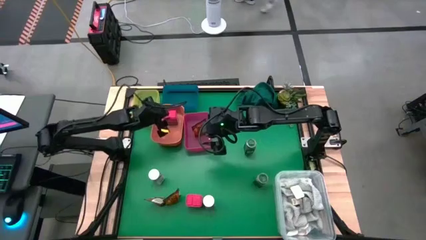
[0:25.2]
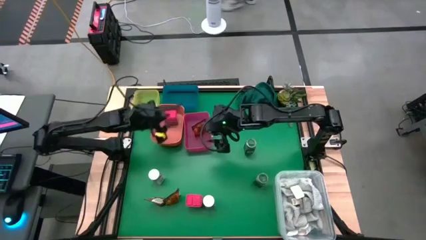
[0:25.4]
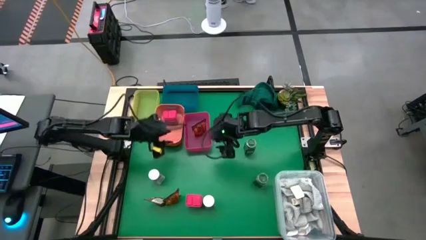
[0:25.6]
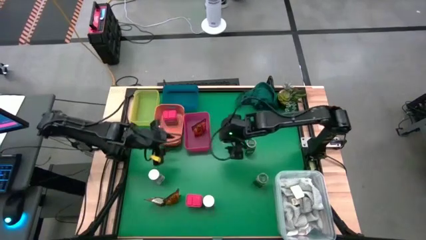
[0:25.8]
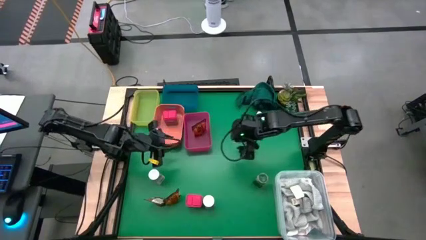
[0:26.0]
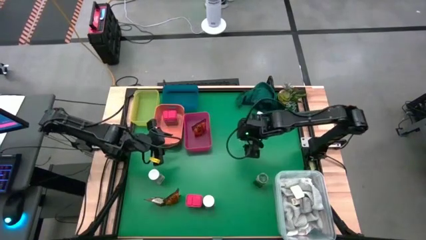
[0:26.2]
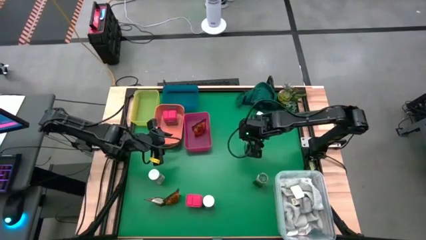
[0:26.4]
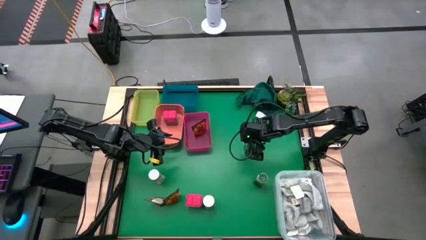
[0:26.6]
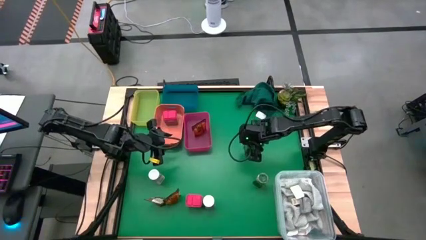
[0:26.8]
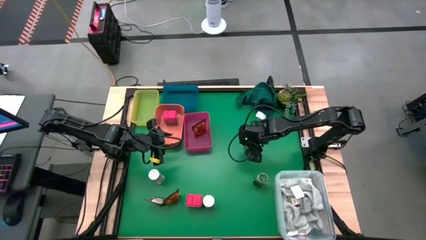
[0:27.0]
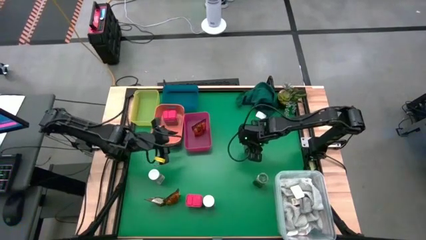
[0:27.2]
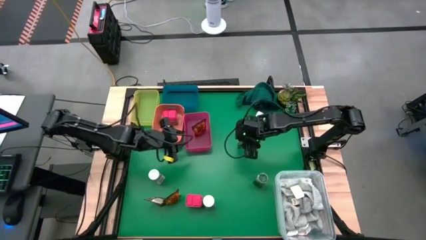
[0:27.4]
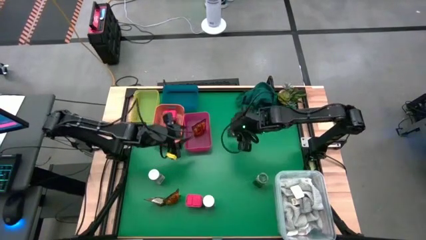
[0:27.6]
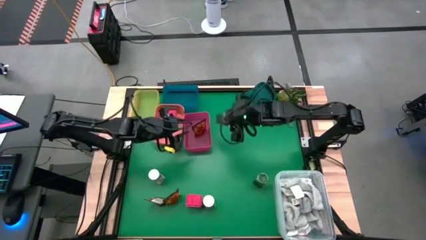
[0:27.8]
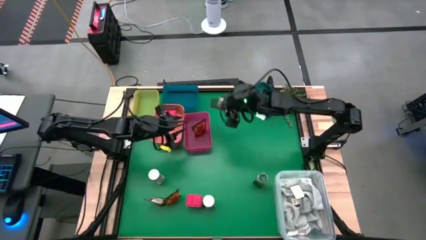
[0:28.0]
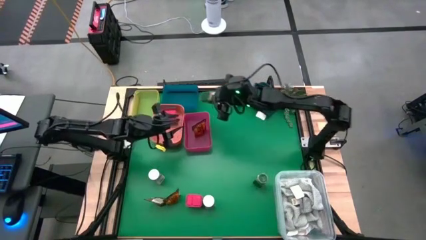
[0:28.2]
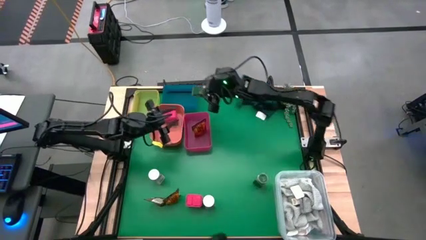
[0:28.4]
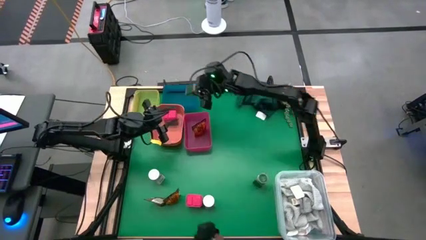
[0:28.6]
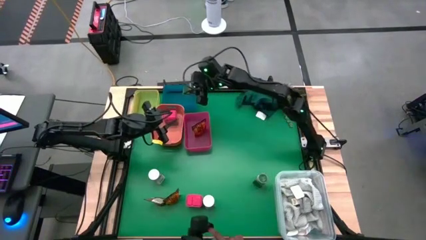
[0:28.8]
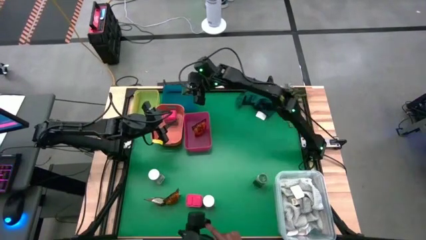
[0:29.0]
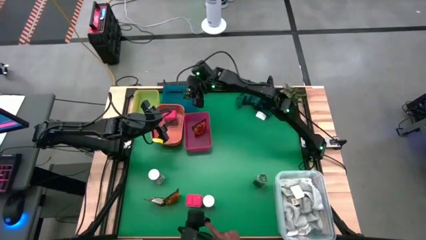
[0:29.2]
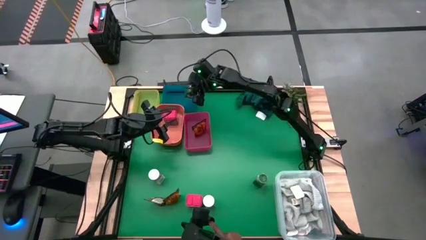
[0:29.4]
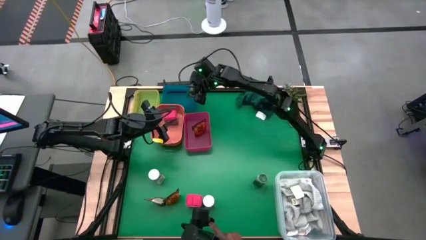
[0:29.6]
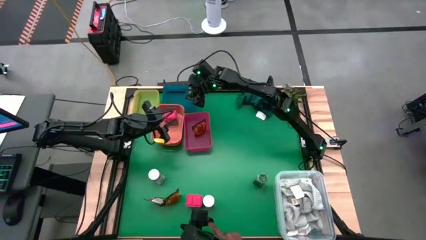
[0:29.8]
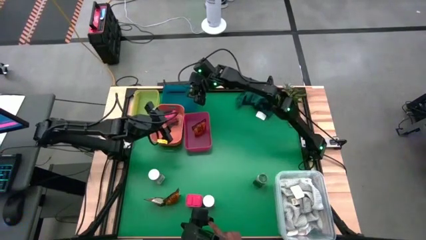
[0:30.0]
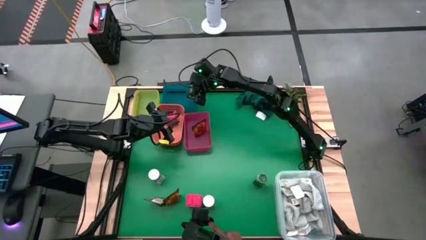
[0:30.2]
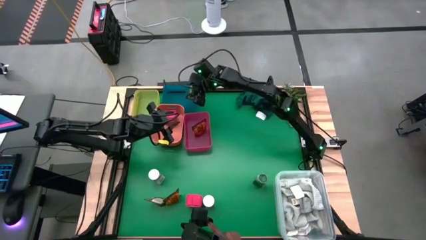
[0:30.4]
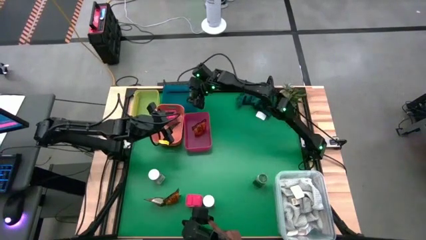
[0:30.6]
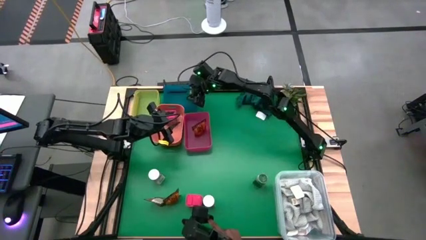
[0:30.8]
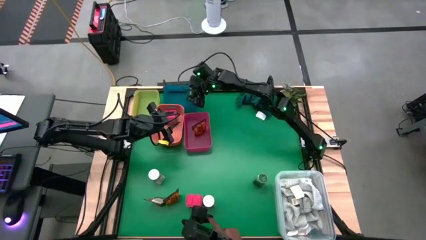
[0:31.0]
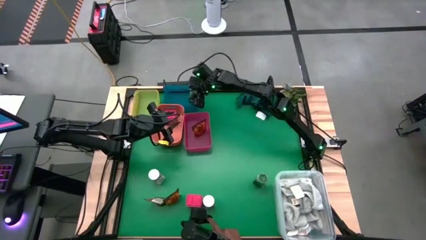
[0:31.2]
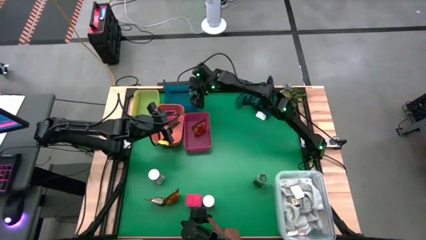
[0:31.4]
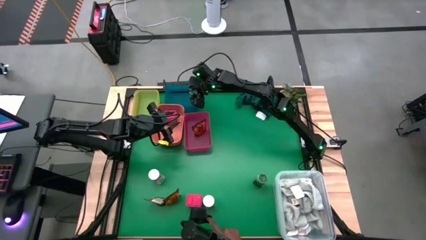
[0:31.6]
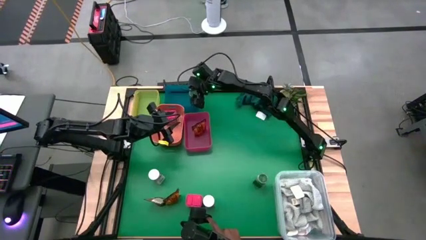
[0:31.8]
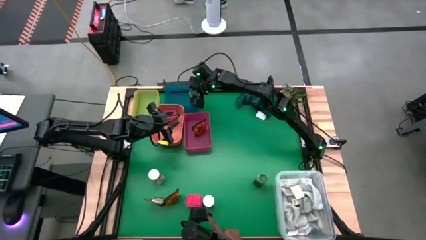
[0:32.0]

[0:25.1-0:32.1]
Task: Sort spices by type
Put the top green seasoning bottle into the blue bin

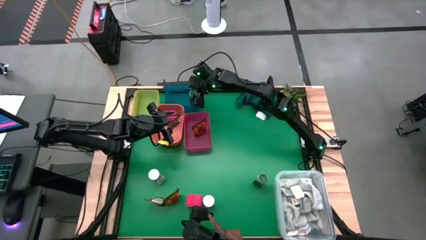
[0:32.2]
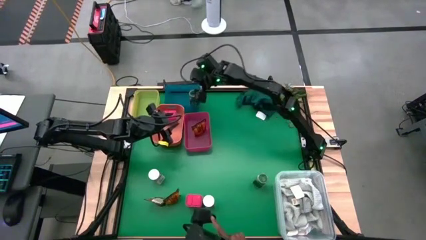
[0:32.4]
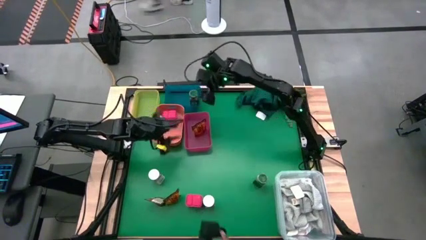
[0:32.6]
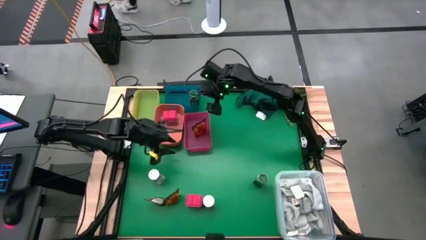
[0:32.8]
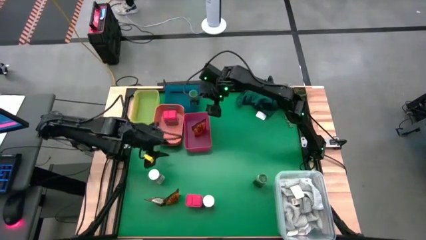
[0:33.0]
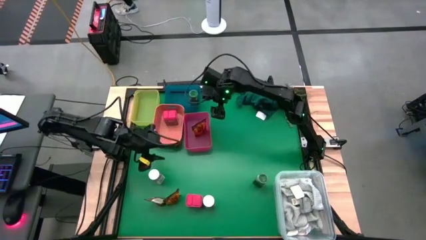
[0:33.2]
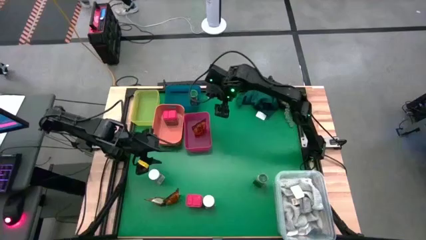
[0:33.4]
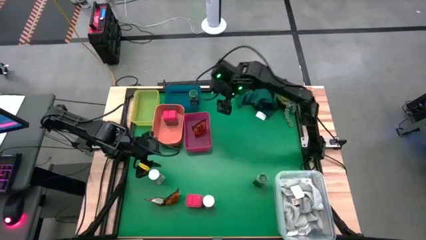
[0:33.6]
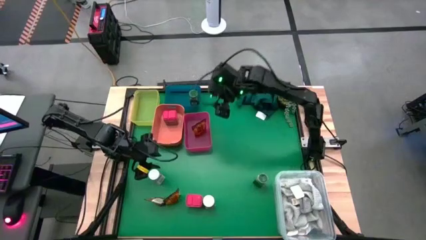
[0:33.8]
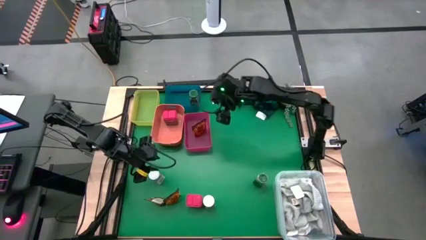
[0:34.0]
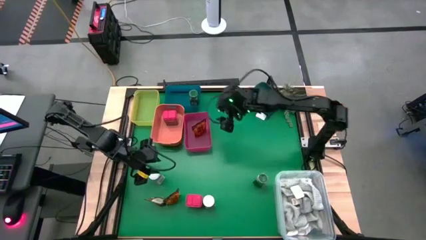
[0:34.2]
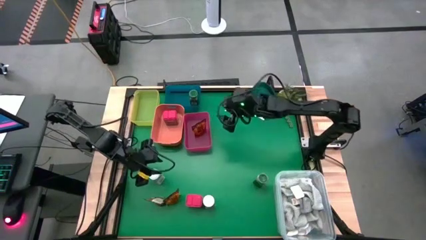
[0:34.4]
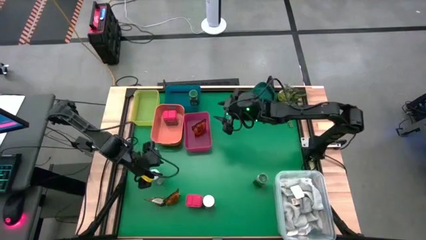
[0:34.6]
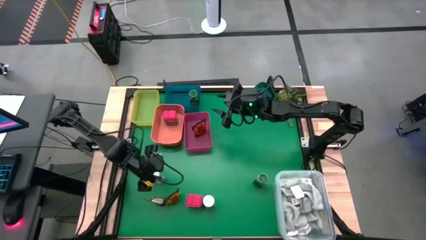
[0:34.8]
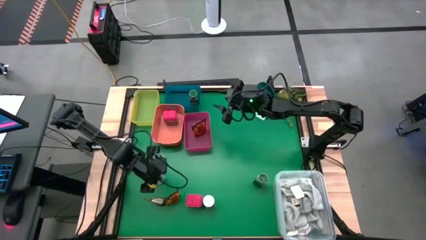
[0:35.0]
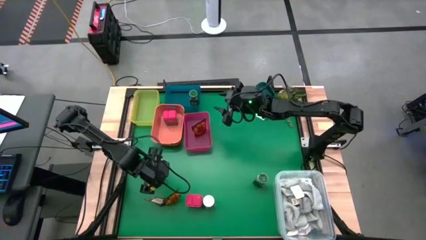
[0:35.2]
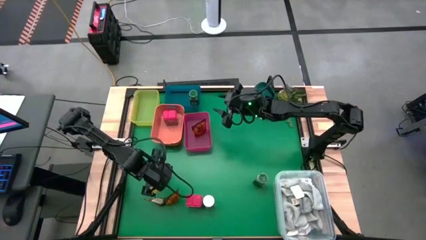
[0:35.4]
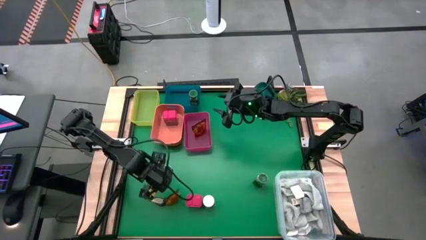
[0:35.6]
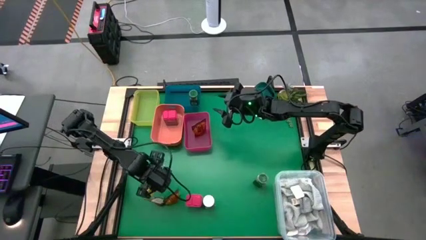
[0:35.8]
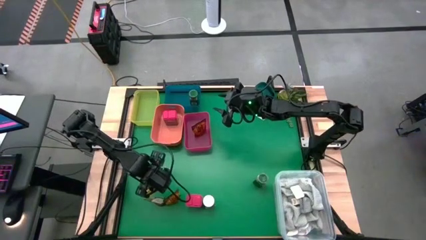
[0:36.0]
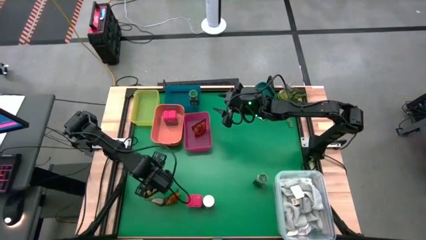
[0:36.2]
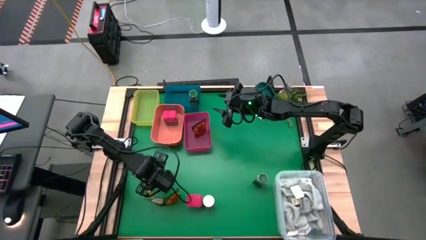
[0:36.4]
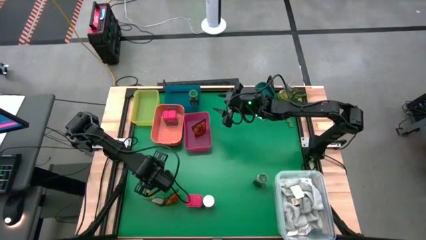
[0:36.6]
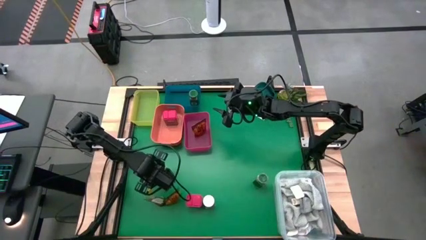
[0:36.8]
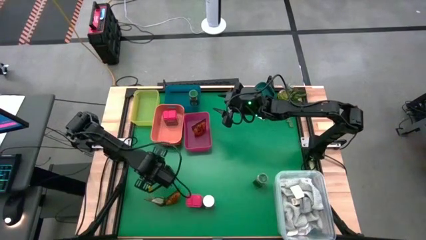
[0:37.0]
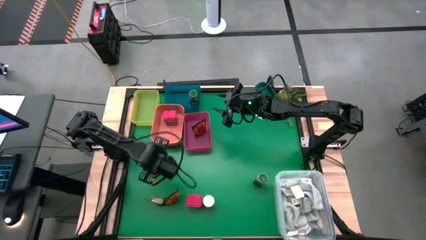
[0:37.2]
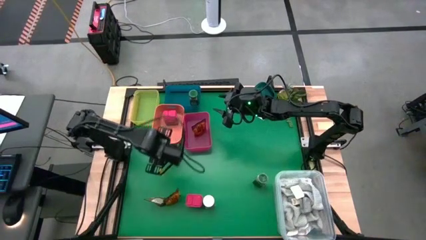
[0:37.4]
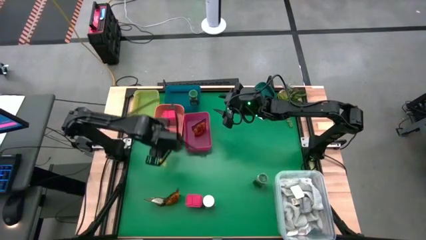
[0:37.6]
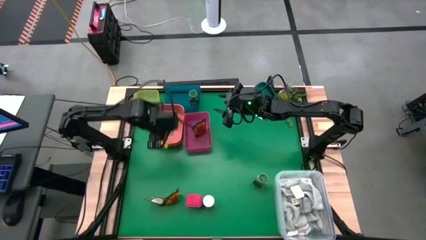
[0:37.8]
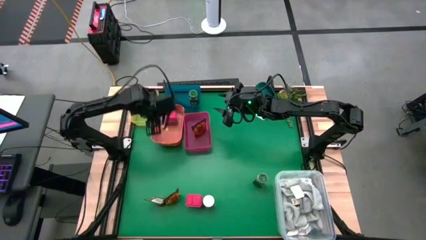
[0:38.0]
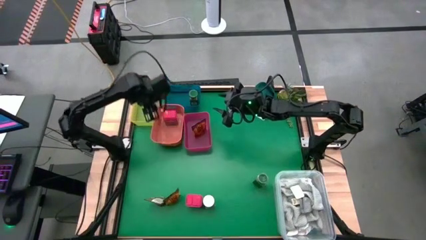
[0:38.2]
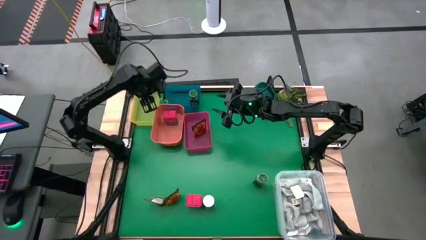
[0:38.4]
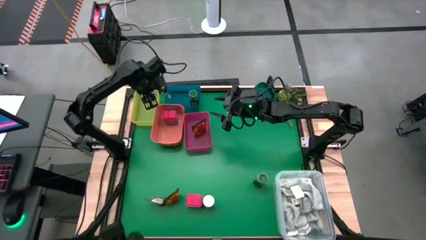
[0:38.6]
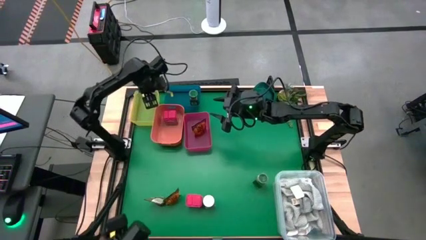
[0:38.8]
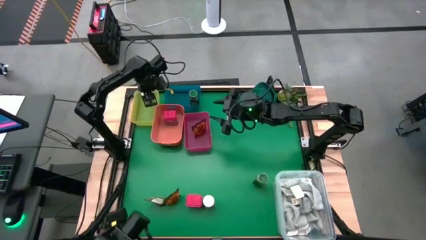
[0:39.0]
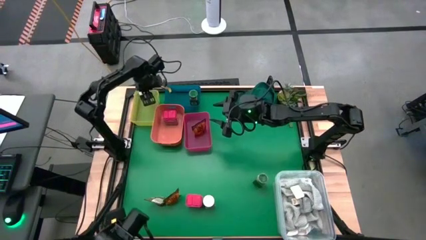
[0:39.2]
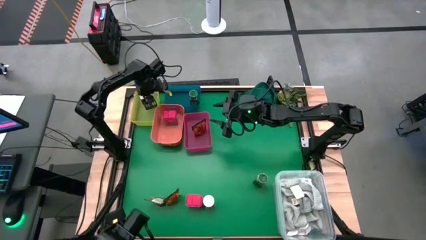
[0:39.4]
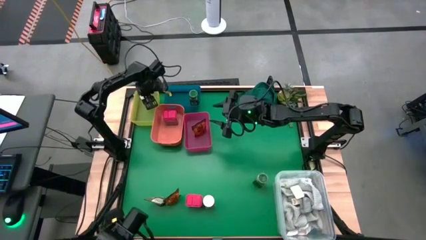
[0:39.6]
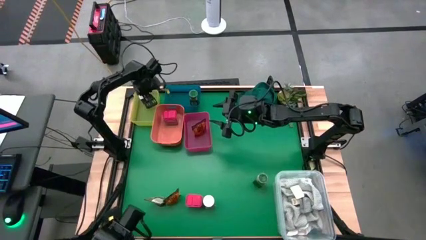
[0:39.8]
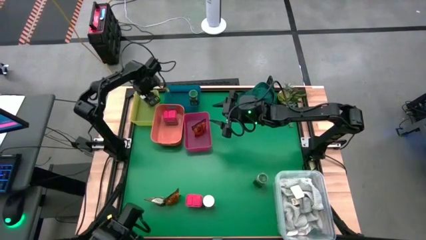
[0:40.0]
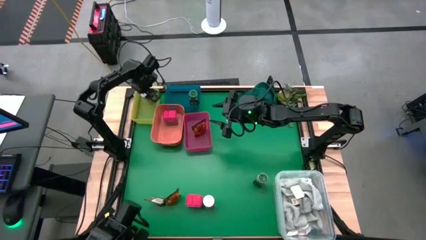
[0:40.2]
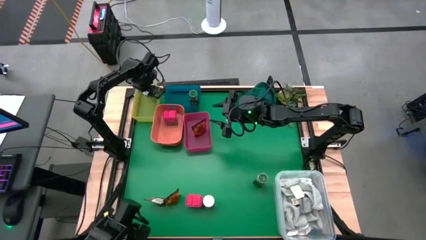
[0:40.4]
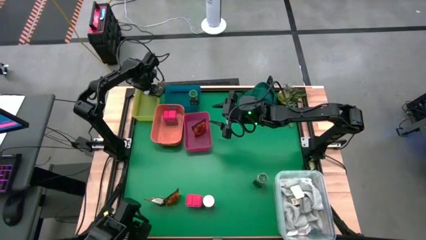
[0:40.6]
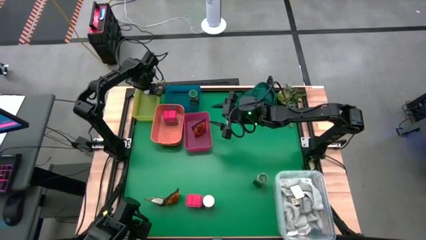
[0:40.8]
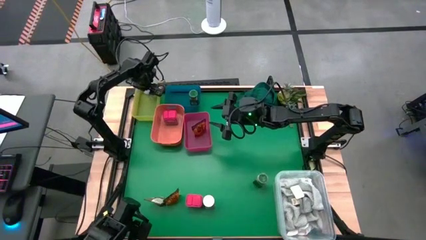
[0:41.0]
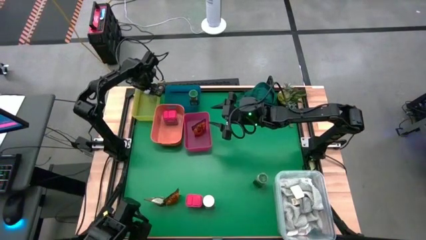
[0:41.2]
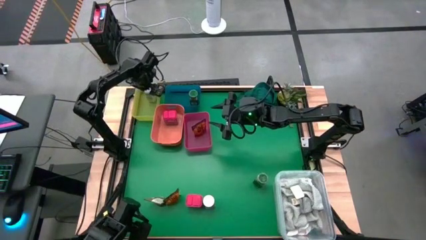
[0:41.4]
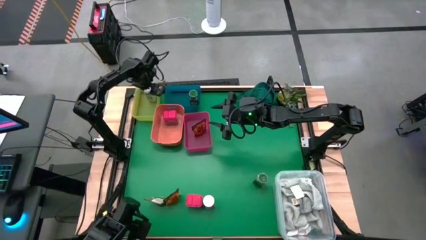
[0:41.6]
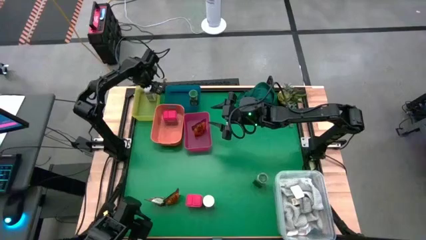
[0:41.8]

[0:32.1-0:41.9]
Put the top white seasoning bottle into the yellow bin

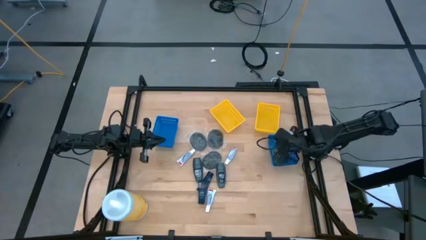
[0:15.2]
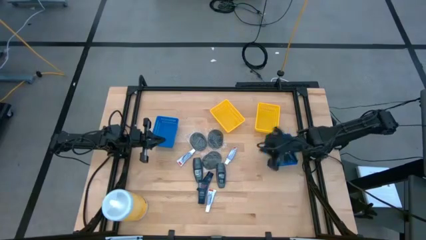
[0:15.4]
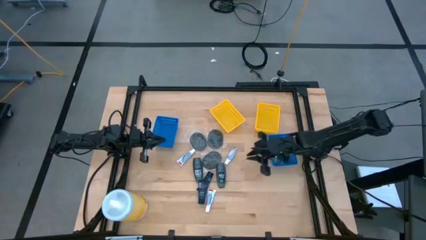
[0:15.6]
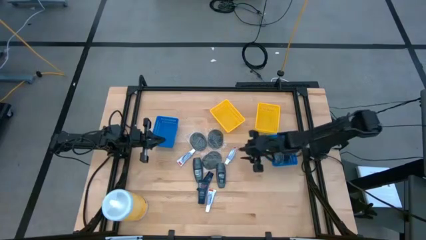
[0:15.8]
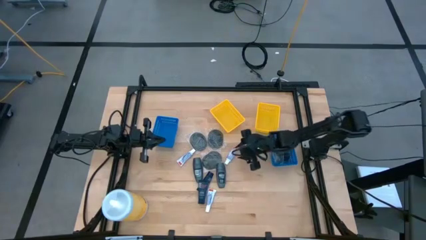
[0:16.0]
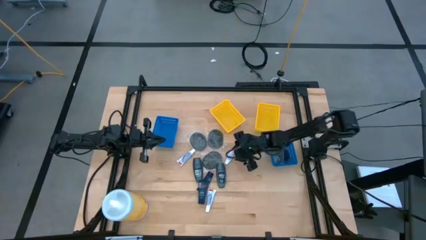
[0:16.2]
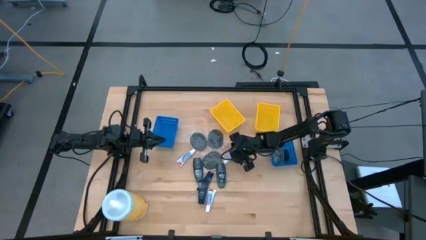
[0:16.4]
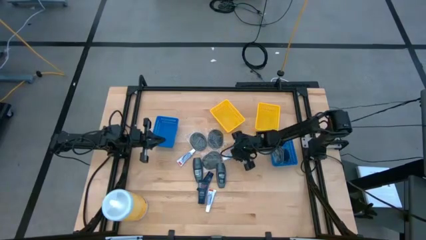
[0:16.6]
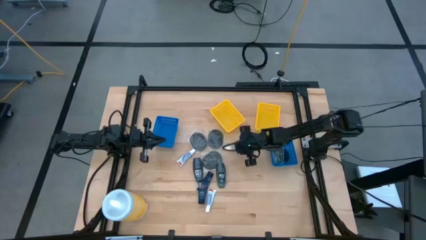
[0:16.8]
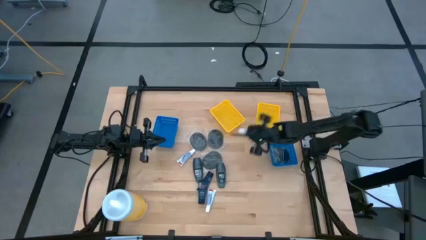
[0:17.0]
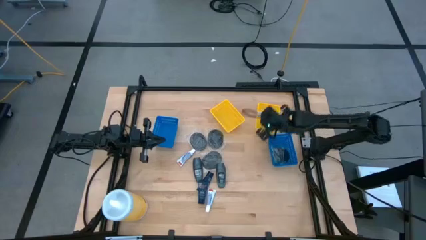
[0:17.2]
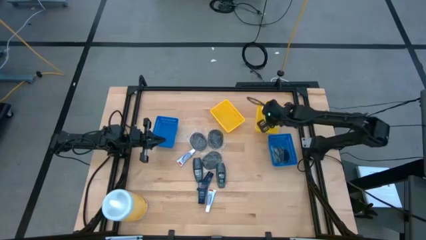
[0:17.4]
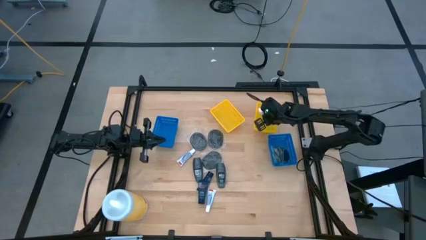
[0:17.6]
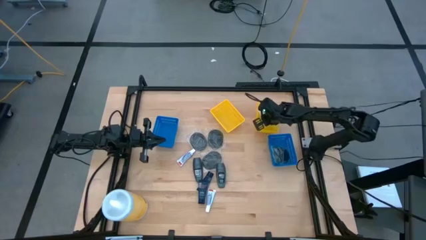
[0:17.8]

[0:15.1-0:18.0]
Task: Pick & Place Travel size toiletries
Put the right white toothpaste into the right yellow bin
